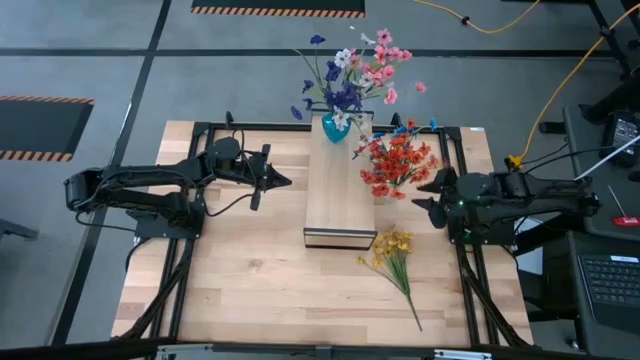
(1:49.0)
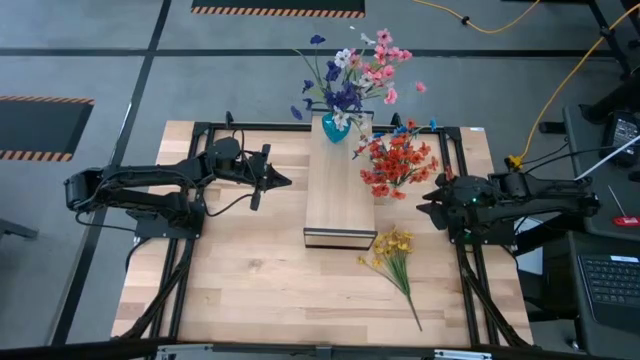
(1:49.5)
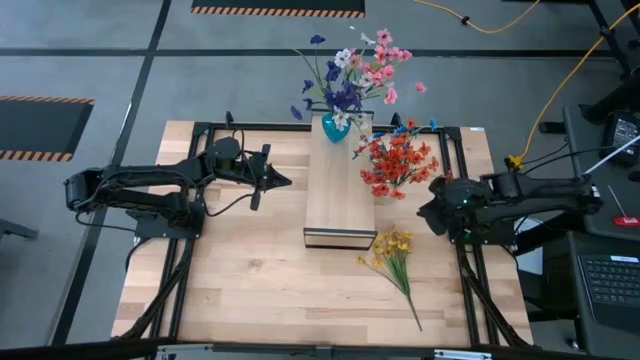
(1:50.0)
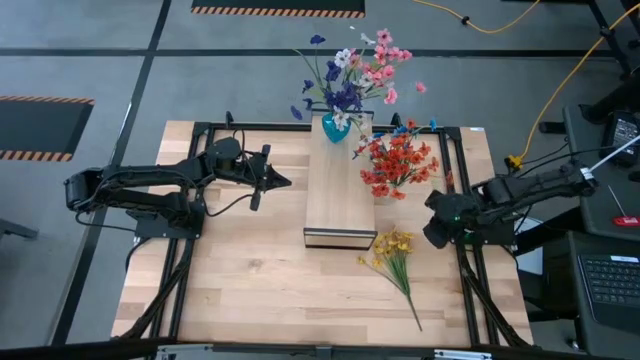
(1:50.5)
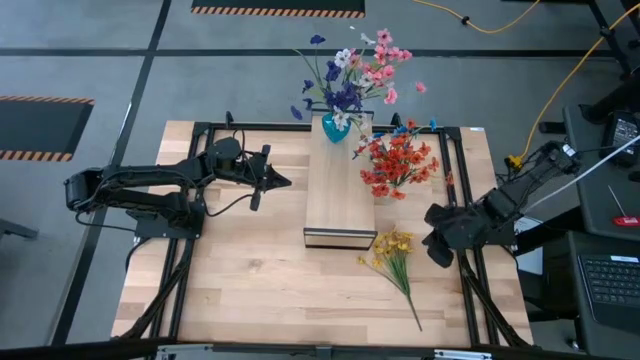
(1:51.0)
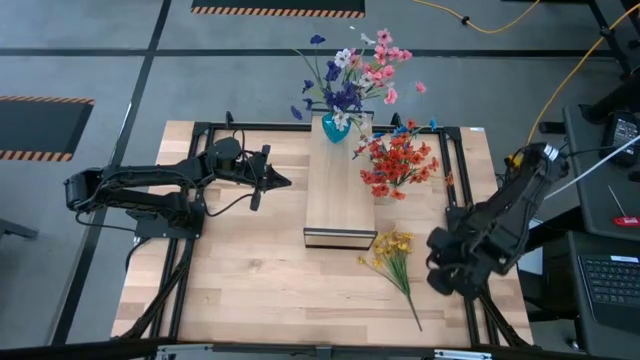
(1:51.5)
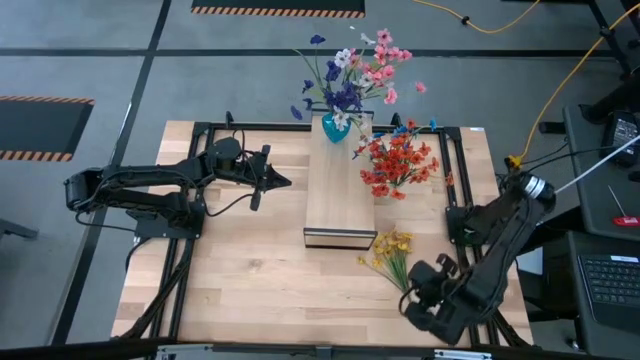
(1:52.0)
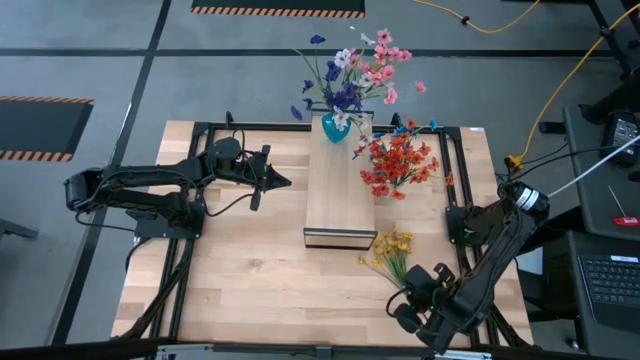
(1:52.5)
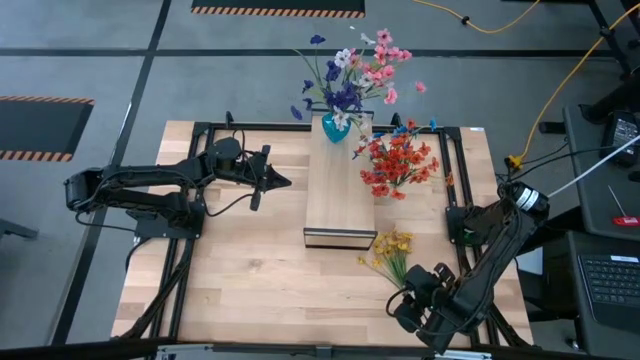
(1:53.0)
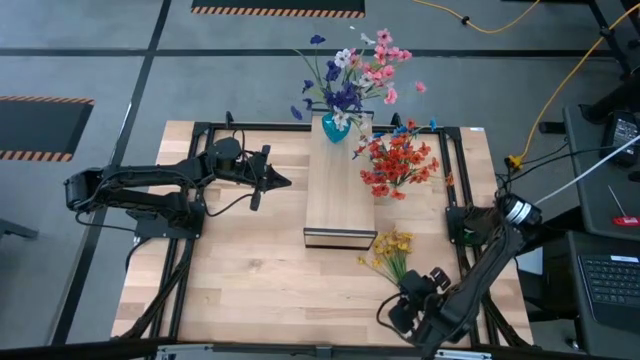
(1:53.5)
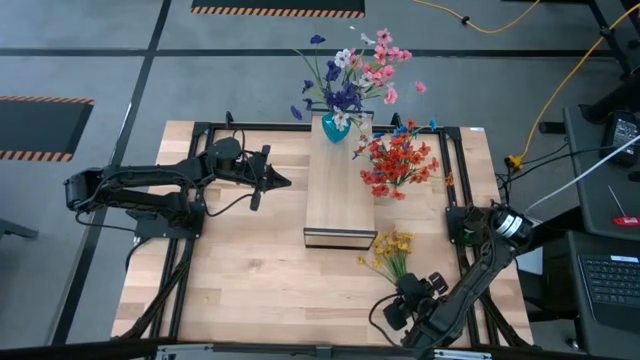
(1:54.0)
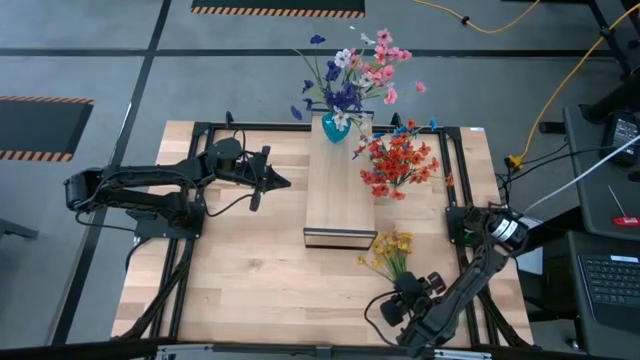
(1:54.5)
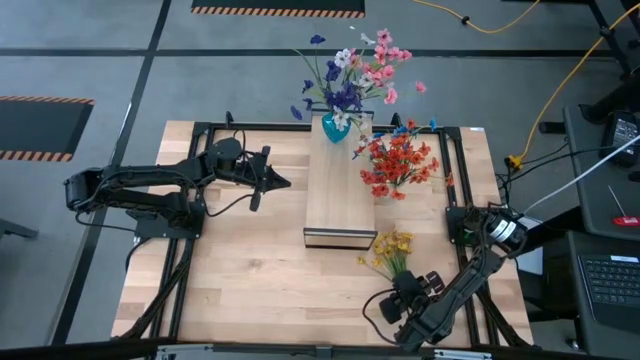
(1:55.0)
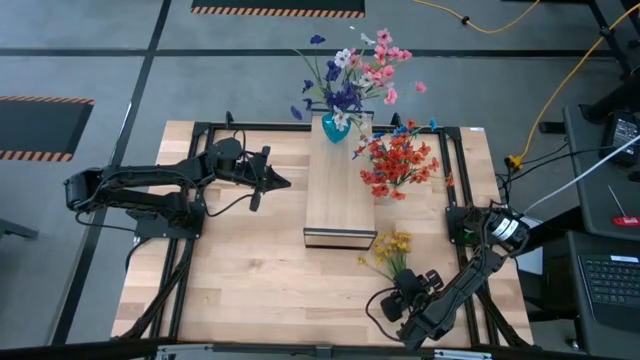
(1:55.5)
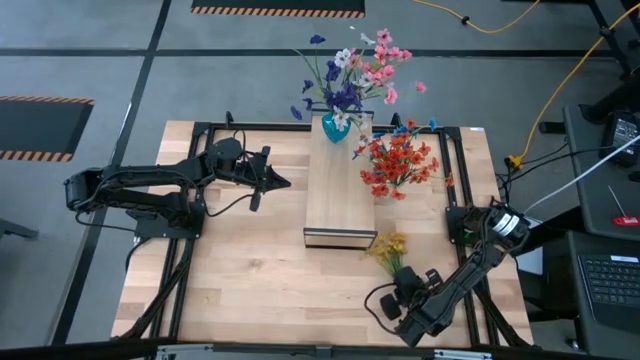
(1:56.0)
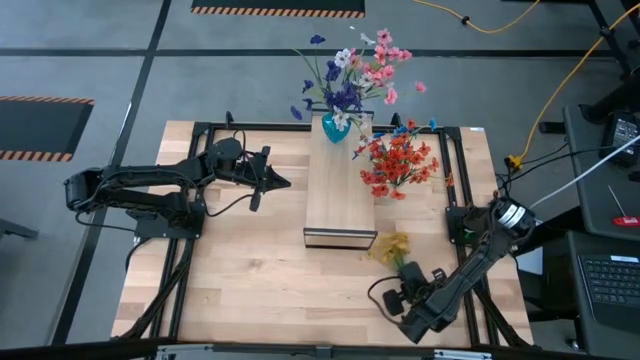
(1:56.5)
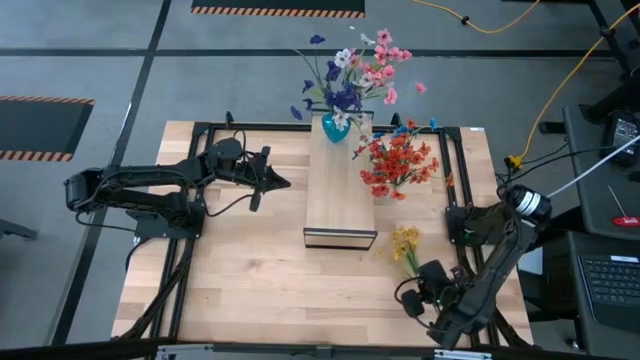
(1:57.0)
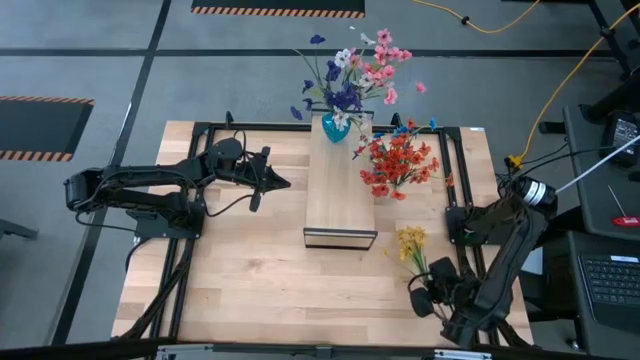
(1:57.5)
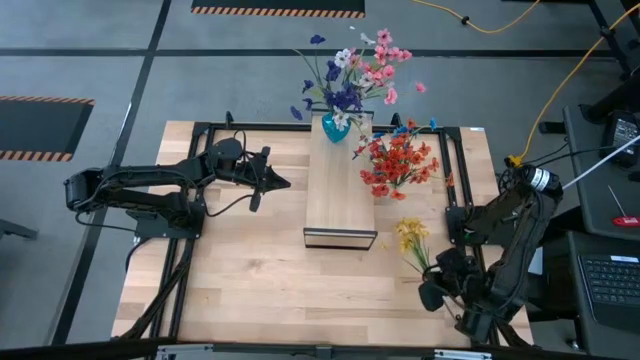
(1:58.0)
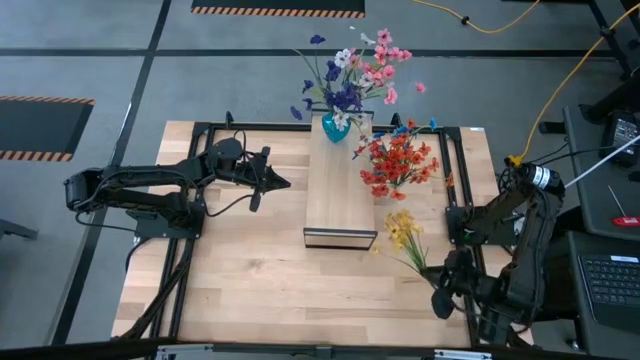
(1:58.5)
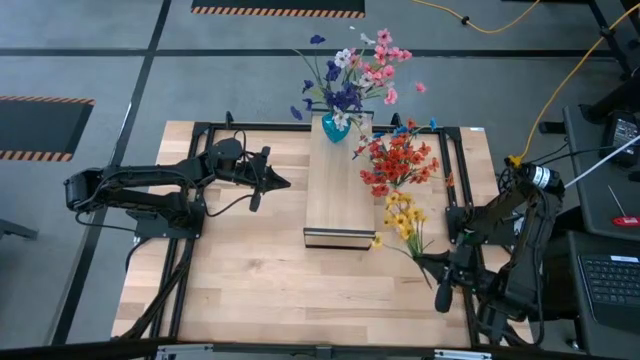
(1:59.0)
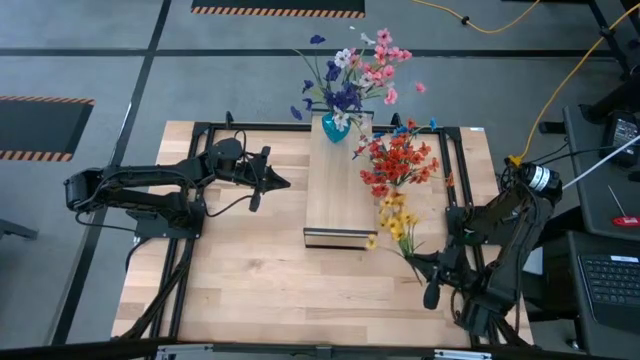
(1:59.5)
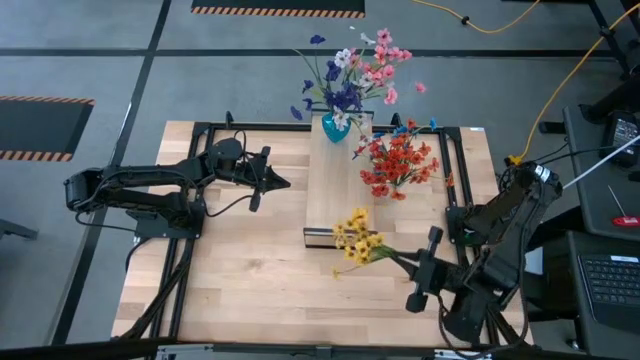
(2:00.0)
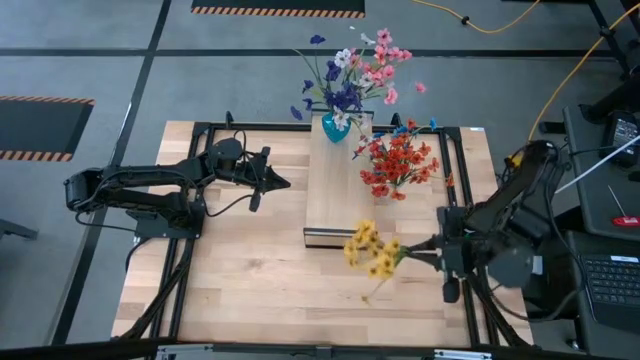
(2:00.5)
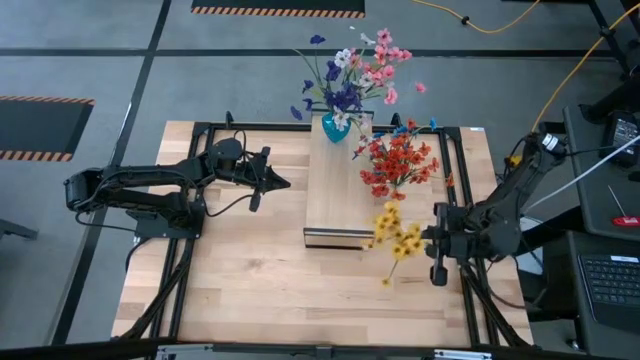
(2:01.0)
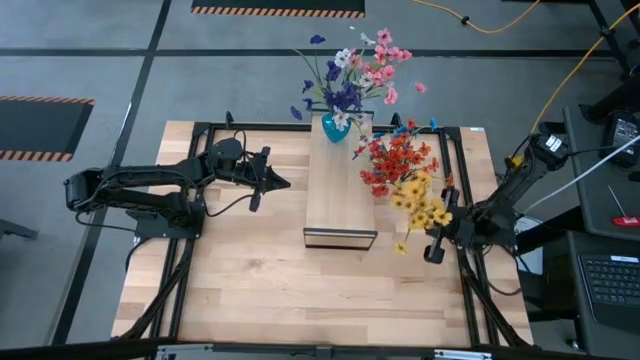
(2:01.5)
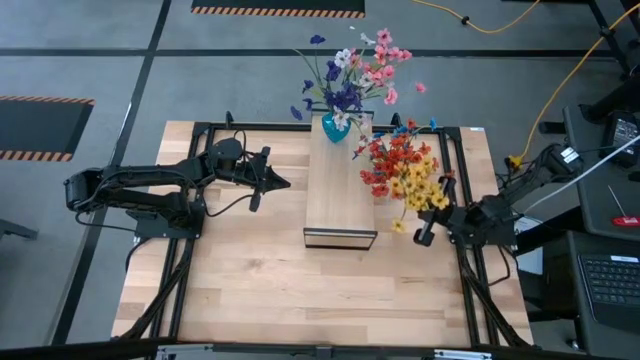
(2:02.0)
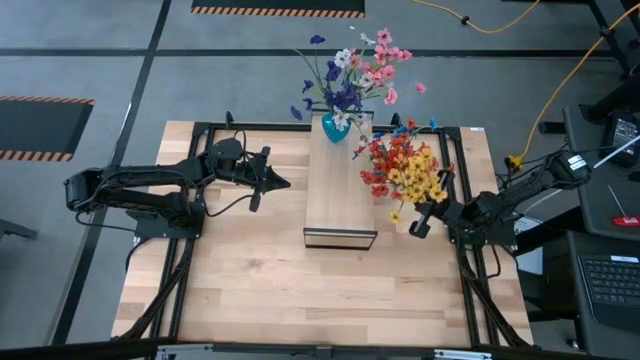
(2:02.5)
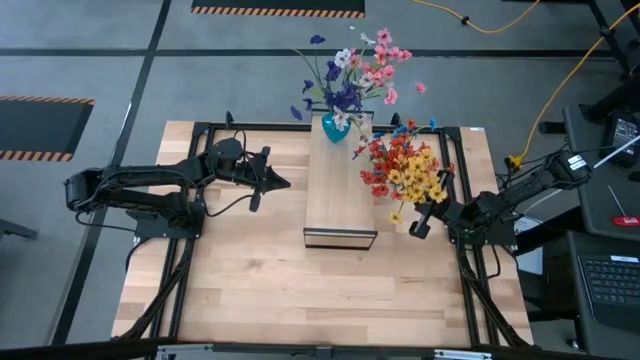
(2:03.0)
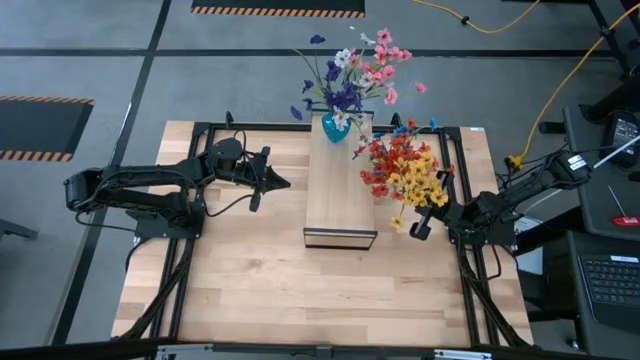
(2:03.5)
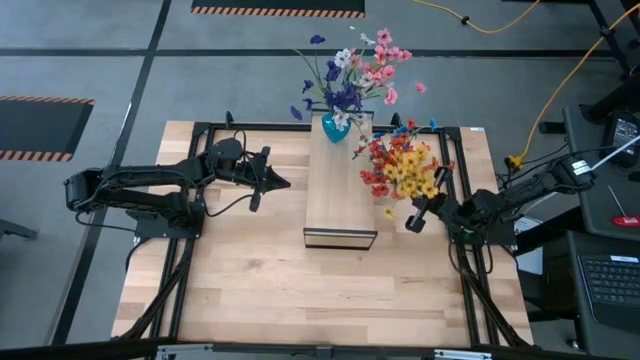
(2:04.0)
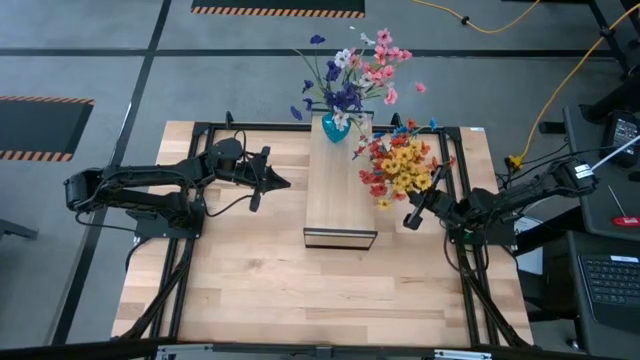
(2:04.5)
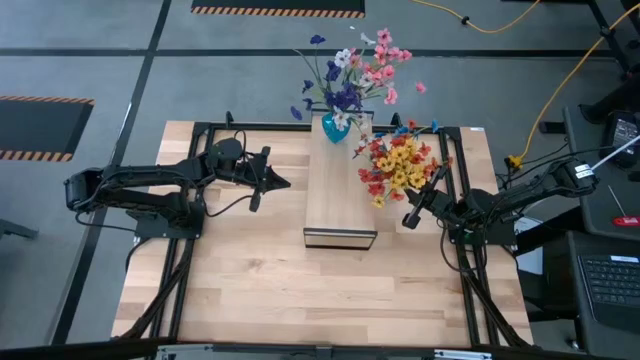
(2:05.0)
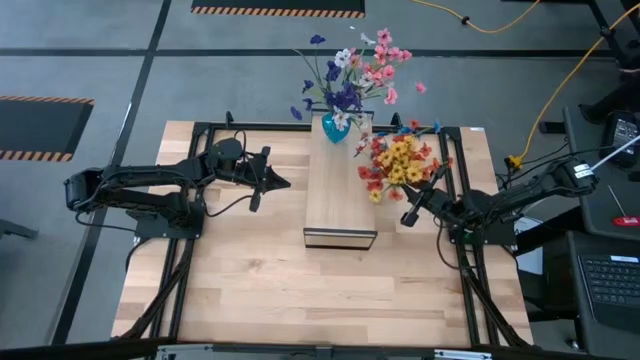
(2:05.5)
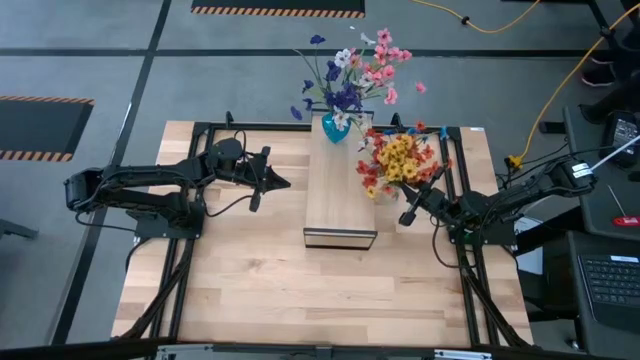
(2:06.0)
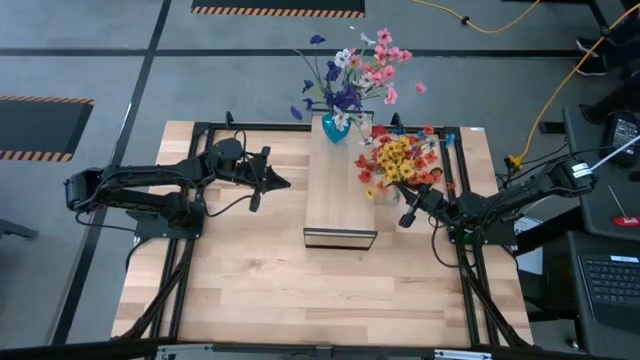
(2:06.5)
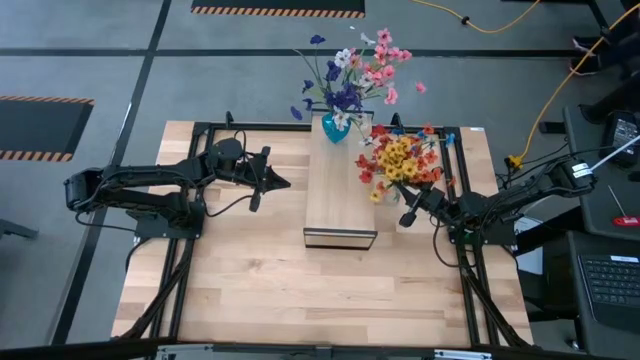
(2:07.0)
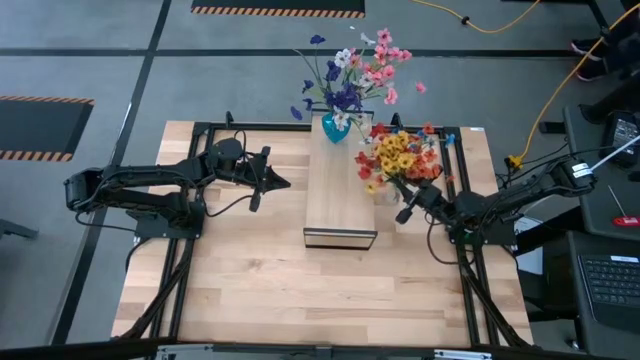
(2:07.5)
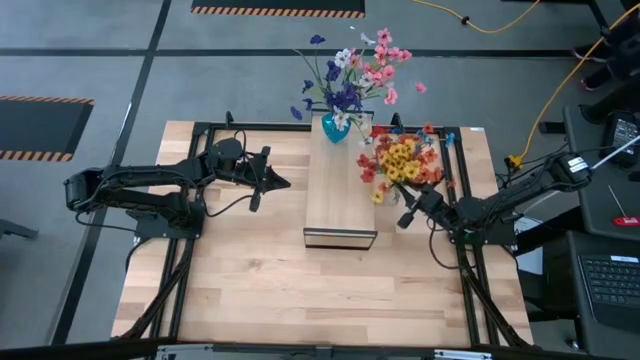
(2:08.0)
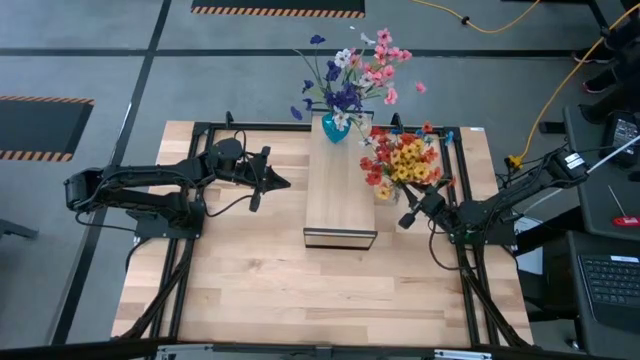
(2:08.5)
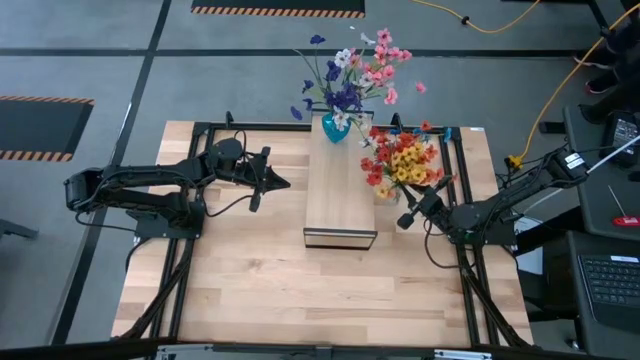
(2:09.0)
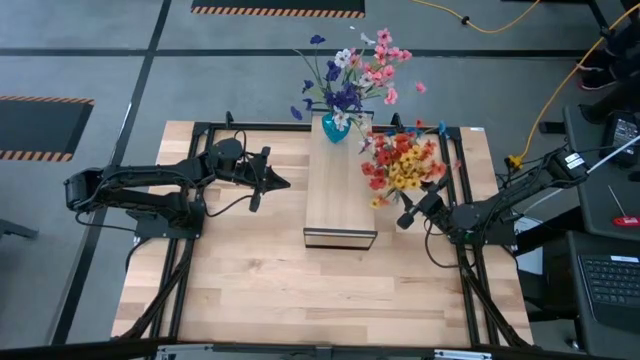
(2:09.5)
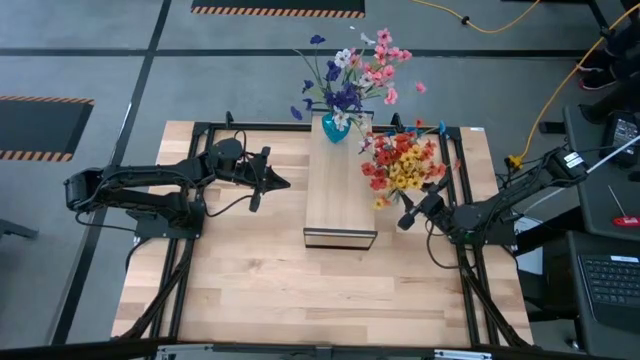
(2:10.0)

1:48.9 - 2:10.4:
Task: Pick and place flowers into a vace then onto a shelf
Put the yellow flowers into the transparent vase
